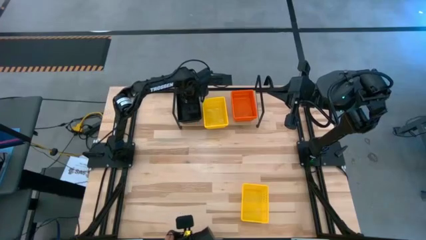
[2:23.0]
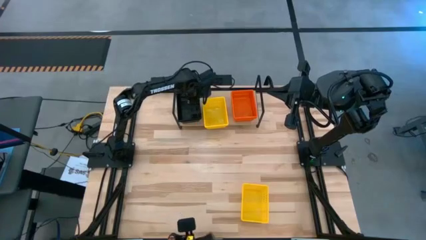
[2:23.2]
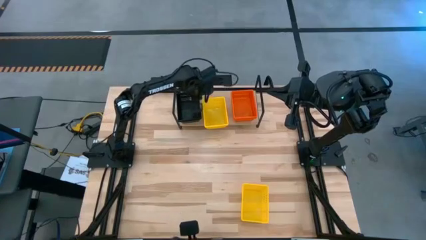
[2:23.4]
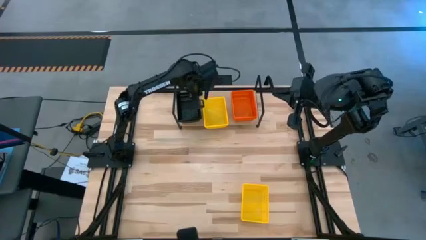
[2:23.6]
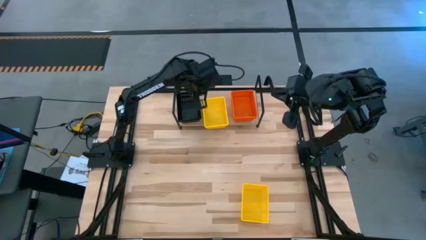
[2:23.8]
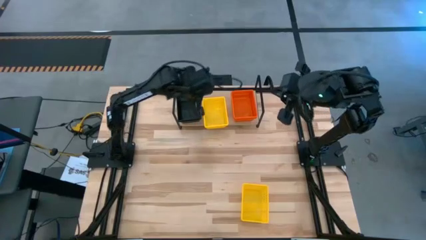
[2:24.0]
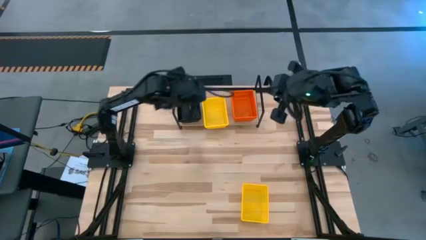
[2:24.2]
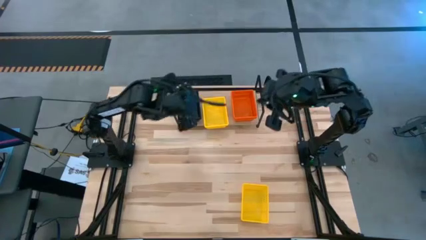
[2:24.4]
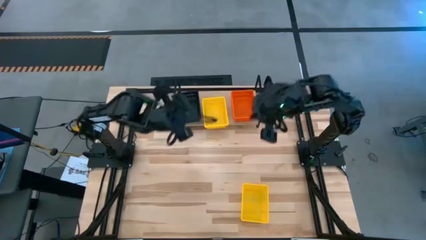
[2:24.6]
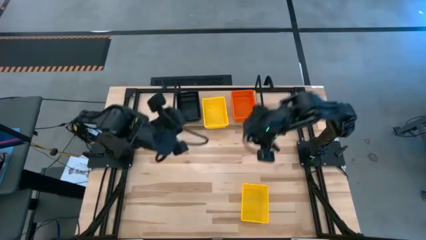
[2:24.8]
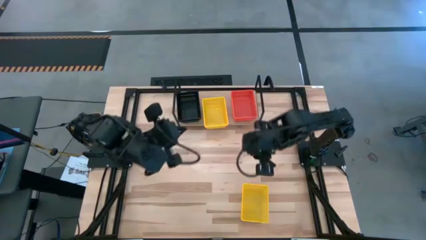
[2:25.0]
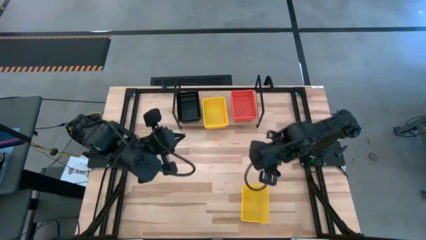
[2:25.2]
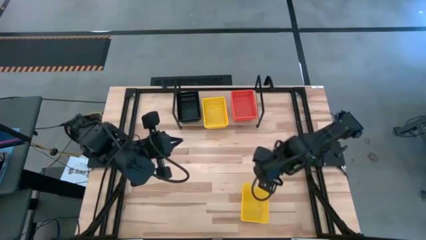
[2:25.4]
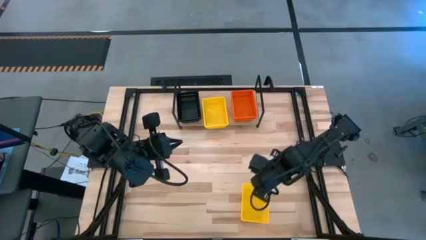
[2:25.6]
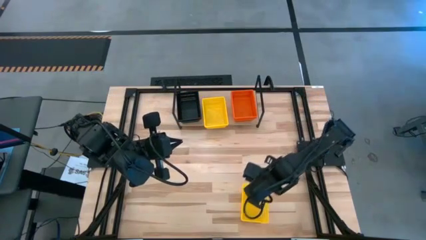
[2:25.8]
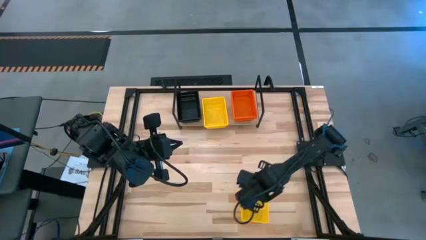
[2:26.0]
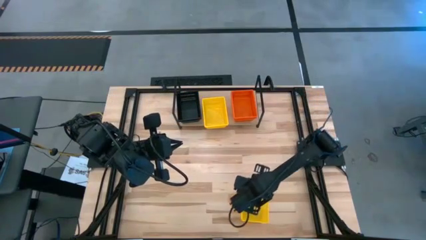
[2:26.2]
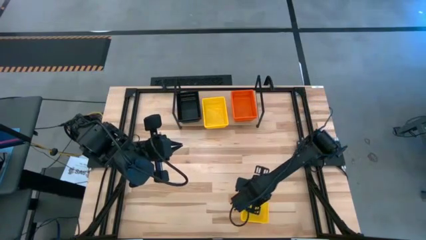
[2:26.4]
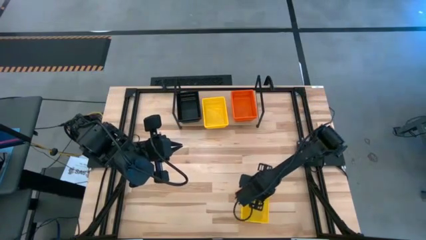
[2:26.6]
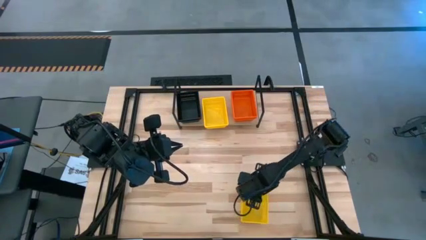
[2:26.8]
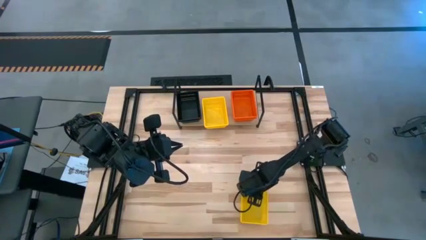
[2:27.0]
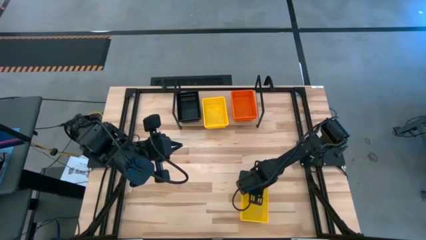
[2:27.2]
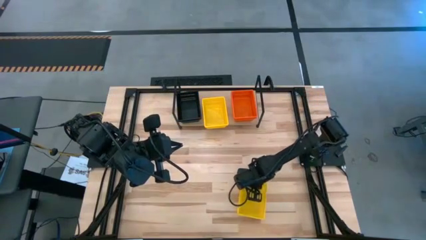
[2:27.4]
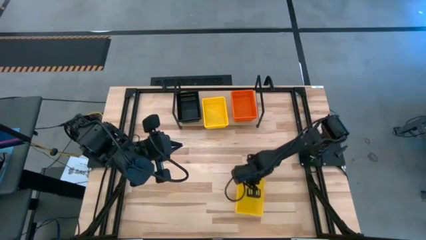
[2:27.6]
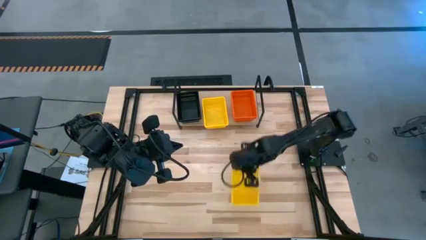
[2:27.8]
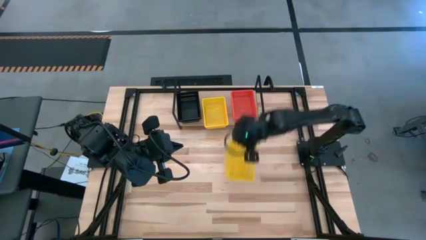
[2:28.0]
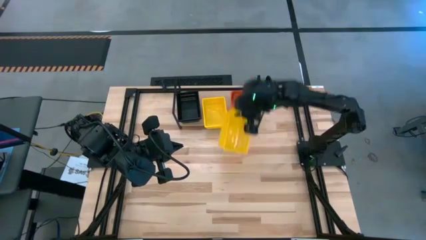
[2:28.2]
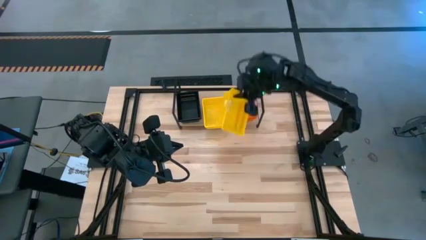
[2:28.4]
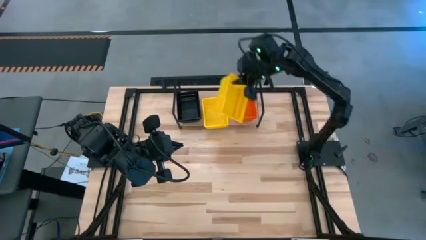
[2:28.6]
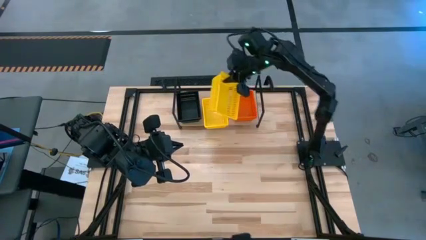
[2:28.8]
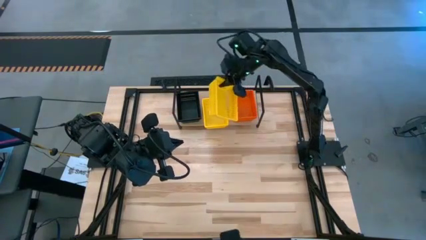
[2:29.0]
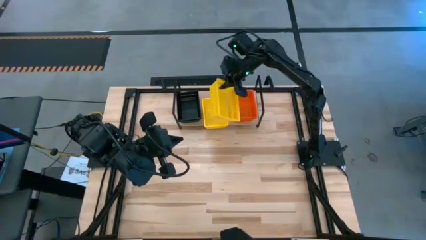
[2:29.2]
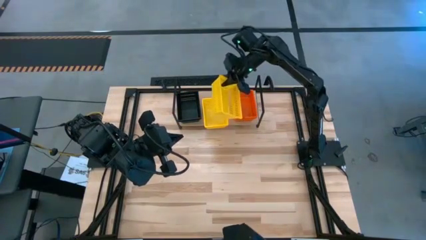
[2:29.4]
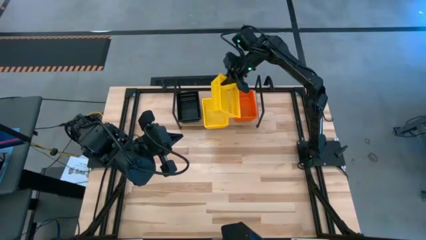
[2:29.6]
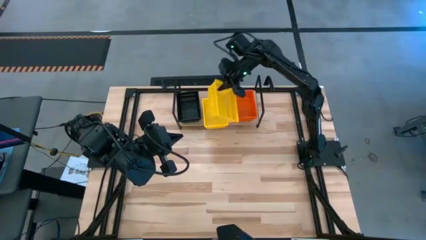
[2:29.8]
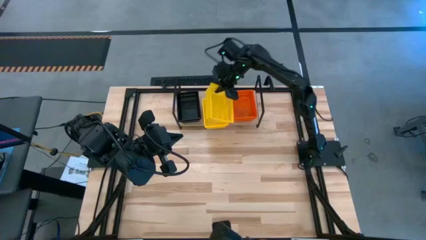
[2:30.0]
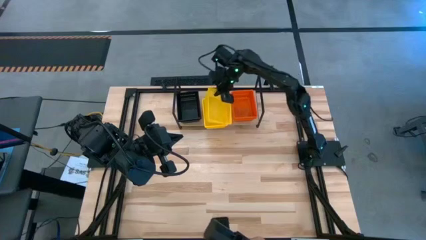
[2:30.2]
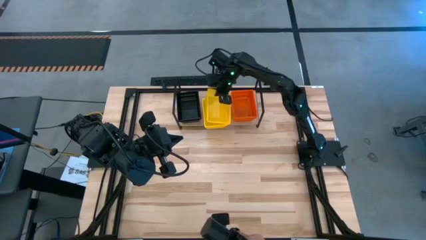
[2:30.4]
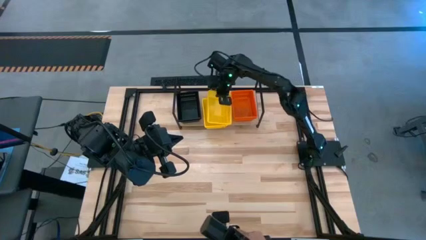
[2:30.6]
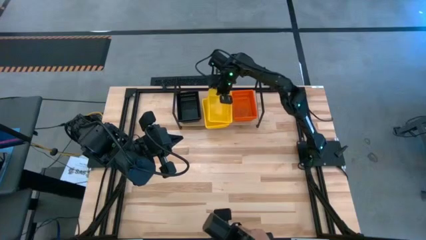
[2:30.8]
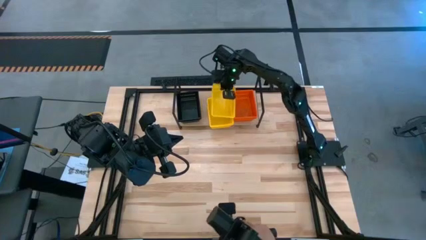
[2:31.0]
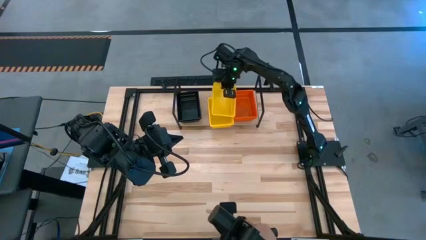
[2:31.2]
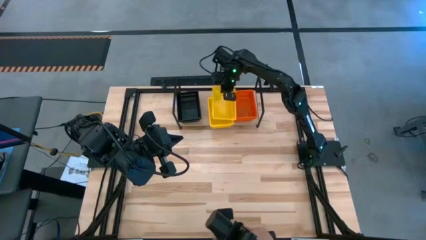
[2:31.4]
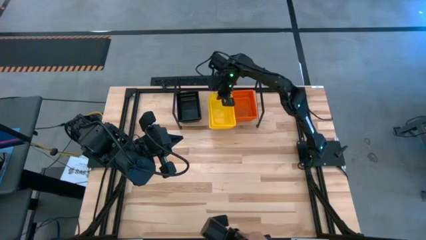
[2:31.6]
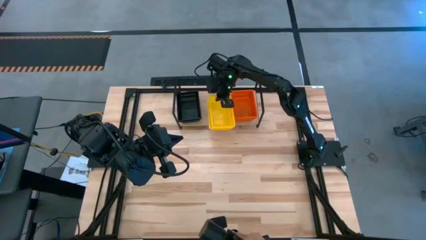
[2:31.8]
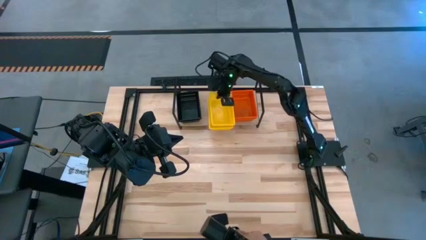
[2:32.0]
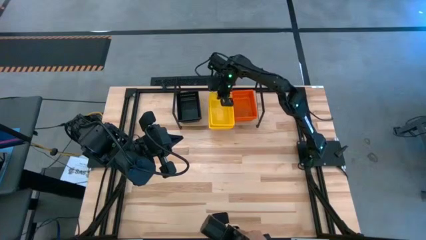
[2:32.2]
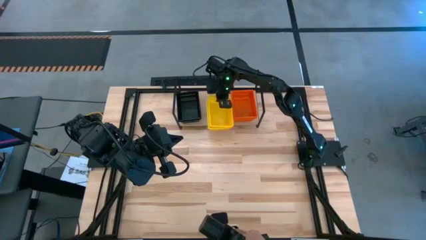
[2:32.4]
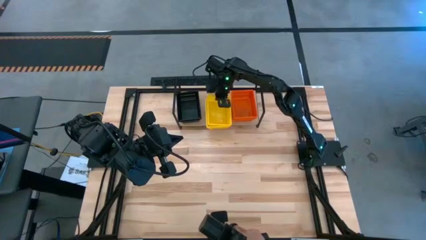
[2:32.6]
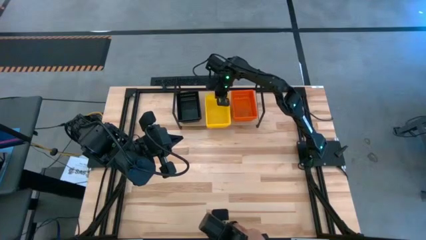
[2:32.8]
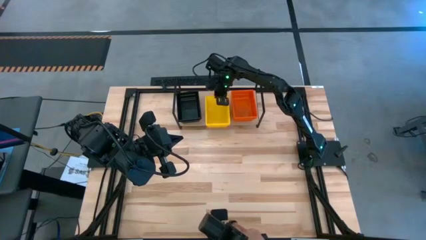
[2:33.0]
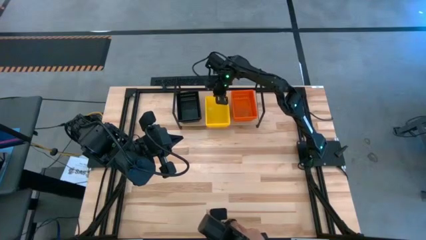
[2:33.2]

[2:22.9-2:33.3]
Task: Stack baskets on shelf by color
Stack the yellow bin on top of the other yellow bin on the shelf

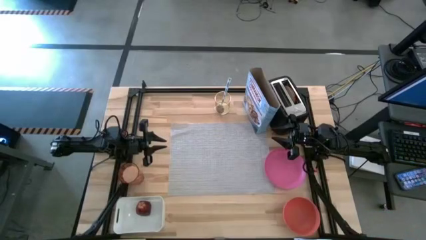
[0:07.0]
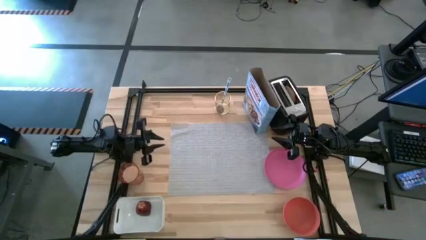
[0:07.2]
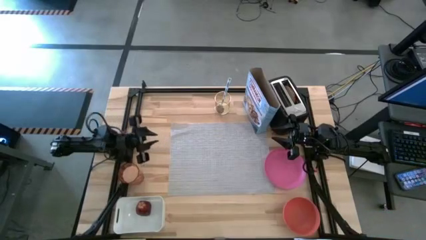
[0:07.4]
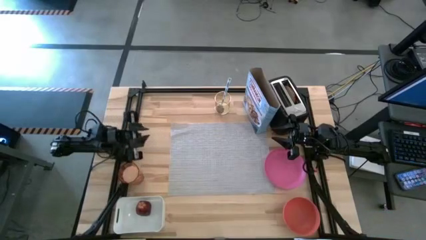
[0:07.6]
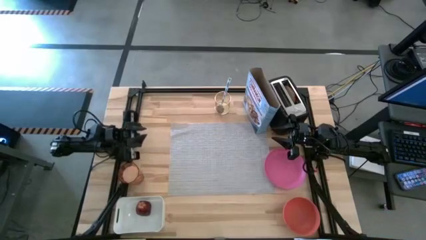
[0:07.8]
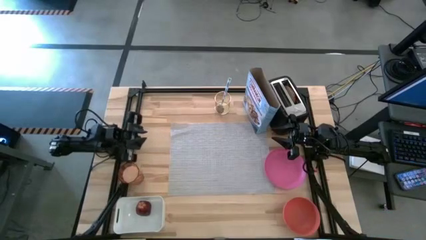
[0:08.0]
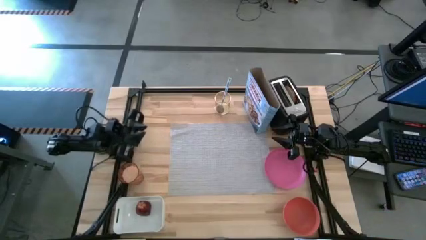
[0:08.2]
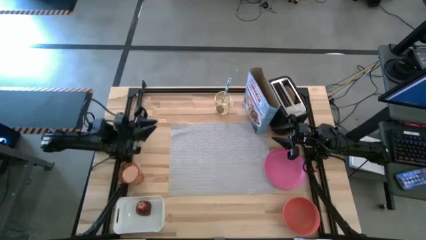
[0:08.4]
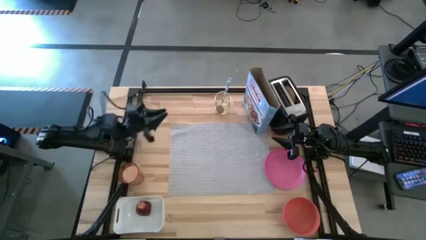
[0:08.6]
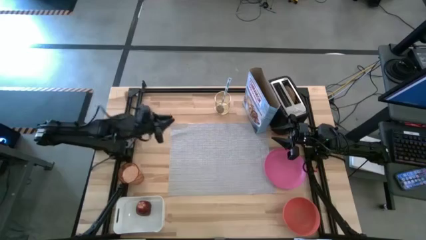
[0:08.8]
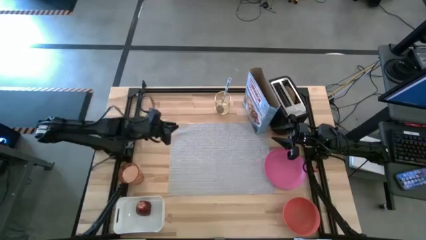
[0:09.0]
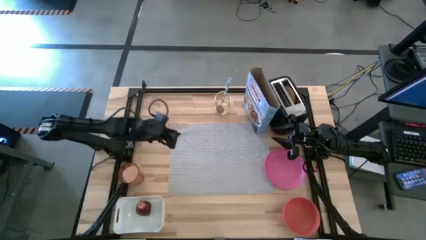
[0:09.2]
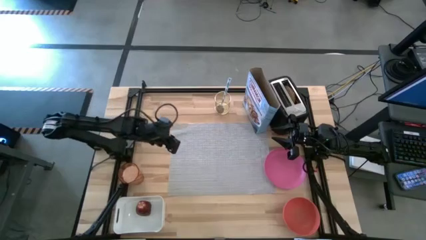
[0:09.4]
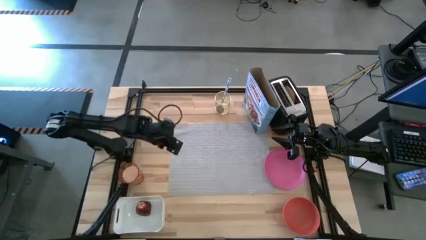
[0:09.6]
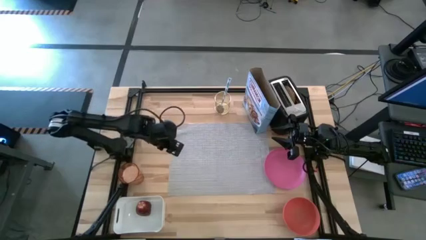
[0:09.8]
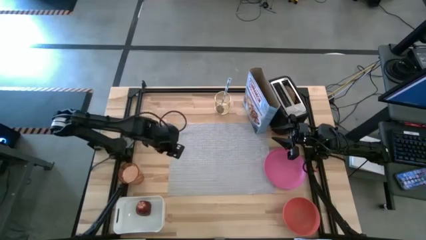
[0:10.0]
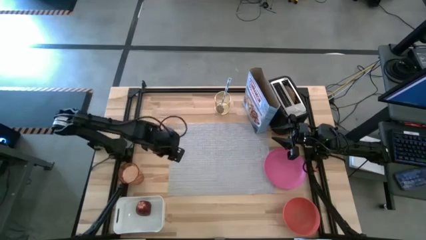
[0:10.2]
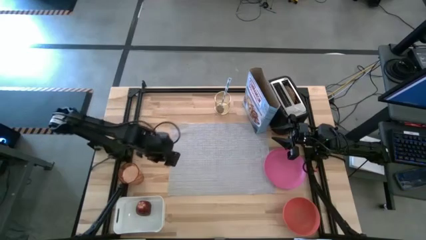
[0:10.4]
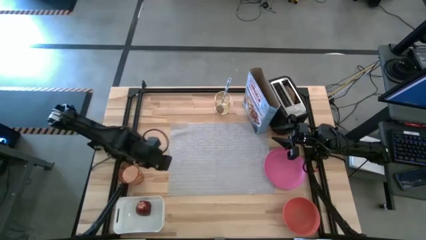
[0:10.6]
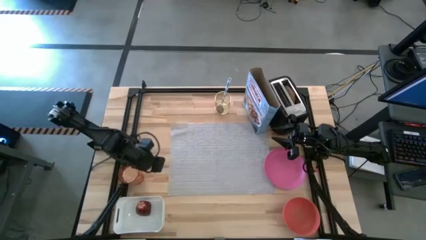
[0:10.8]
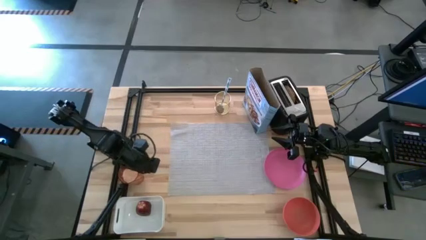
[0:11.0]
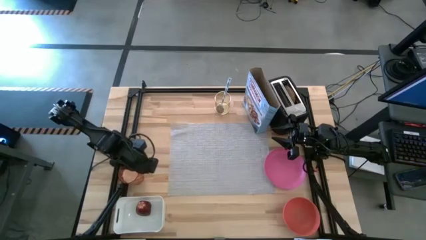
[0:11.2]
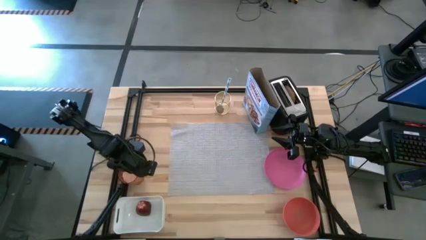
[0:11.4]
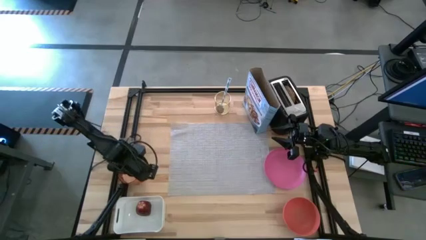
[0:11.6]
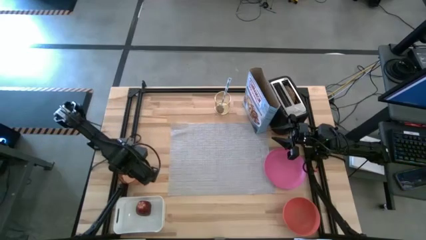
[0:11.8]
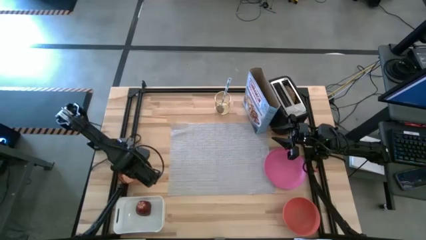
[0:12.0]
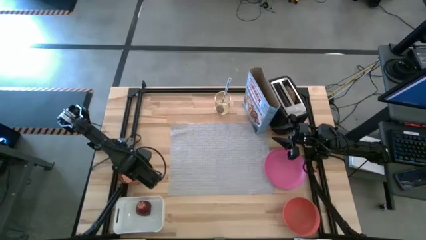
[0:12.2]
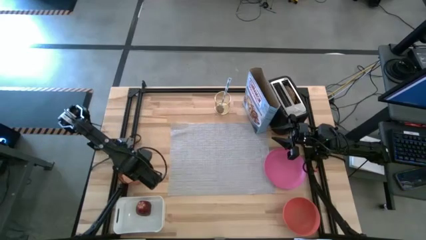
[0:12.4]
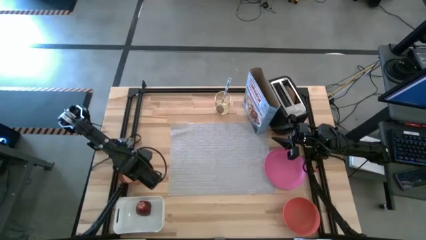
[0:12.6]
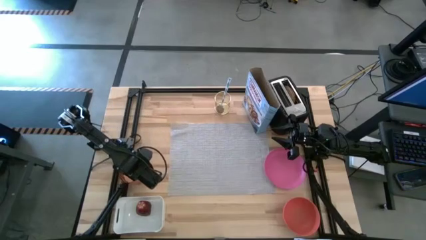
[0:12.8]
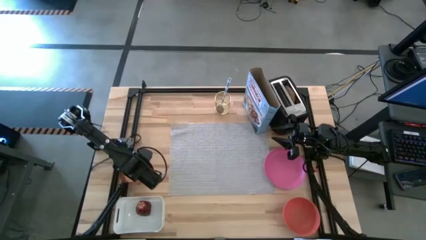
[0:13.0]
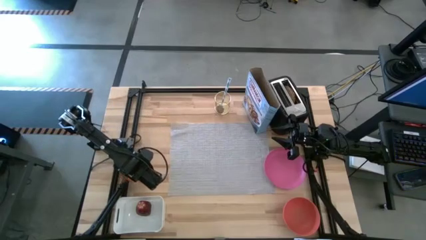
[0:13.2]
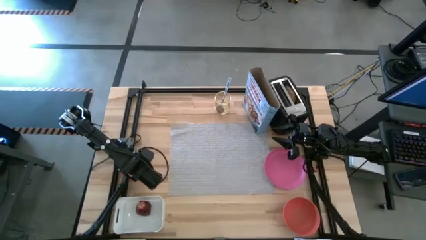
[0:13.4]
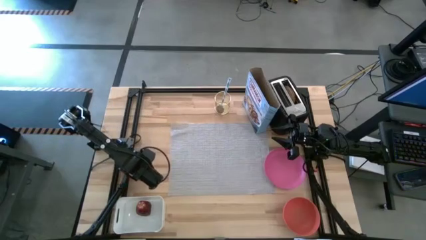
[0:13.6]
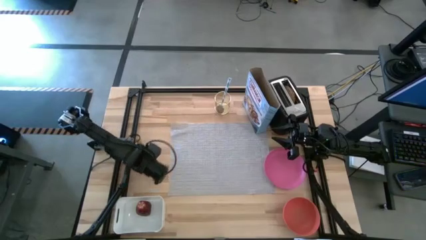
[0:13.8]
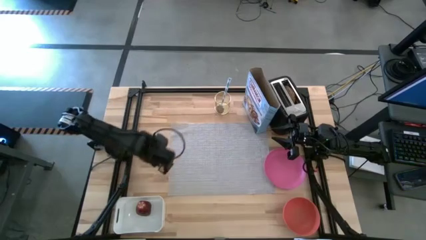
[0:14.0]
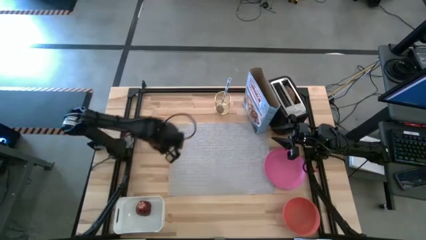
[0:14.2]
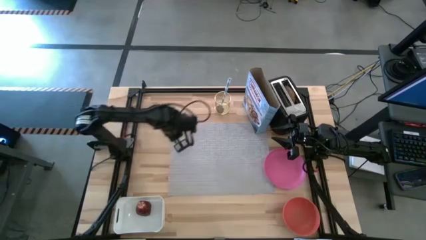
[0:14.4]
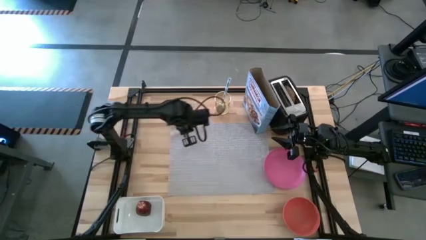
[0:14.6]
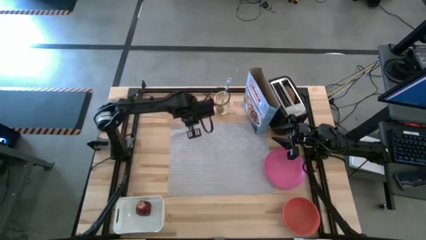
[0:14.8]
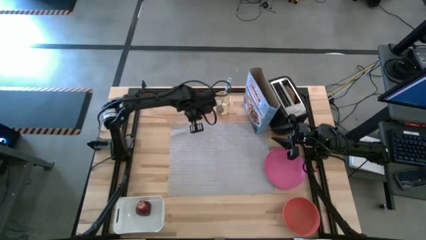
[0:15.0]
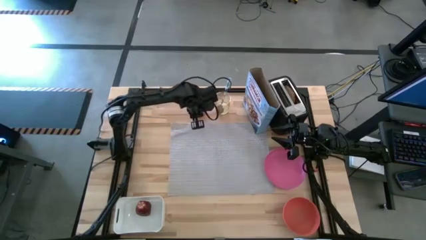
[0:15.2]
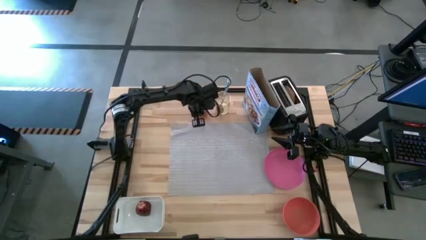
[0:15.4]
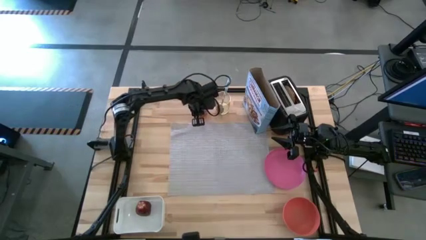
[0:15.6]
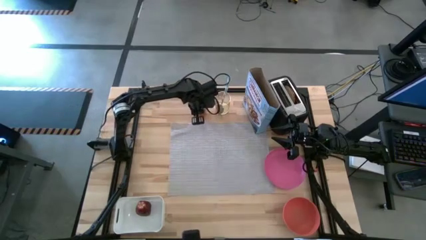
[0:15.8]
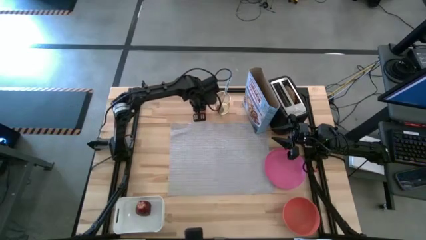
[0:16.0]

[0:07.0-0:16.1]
Task: Arrange a breakfast setting
Move the brown cup to the top center of the table
